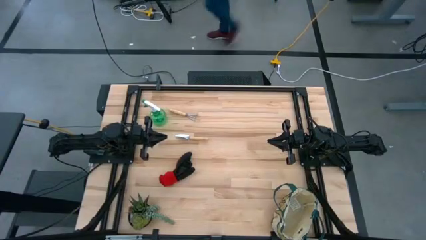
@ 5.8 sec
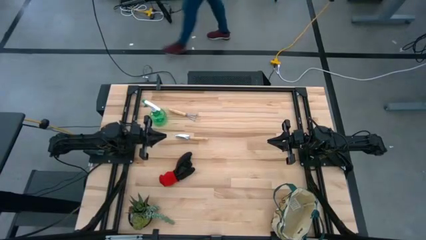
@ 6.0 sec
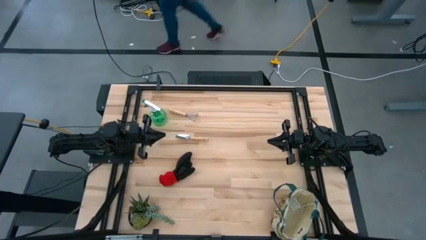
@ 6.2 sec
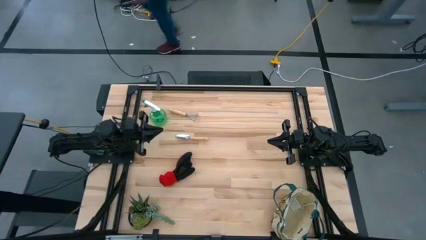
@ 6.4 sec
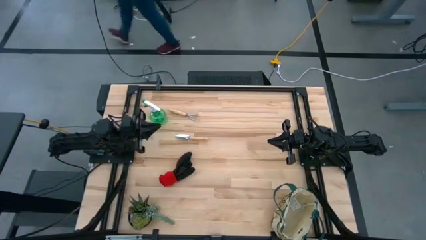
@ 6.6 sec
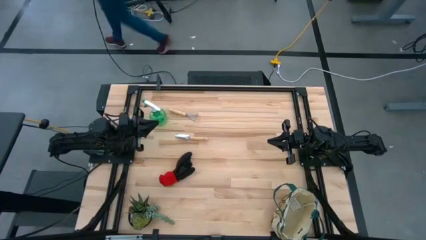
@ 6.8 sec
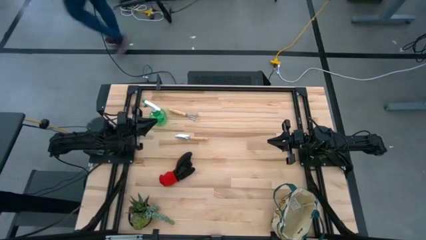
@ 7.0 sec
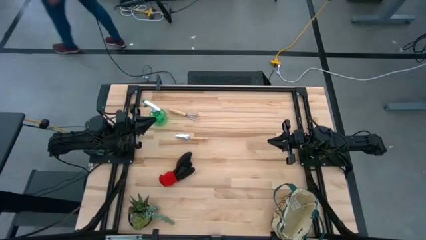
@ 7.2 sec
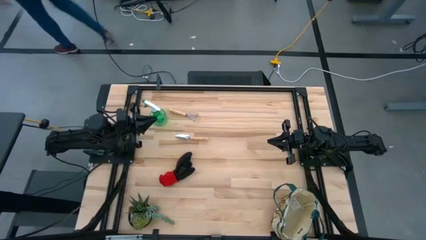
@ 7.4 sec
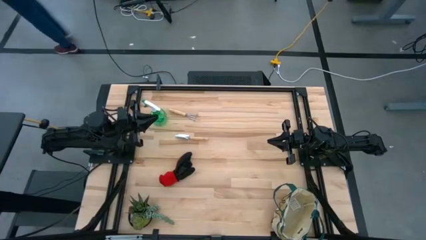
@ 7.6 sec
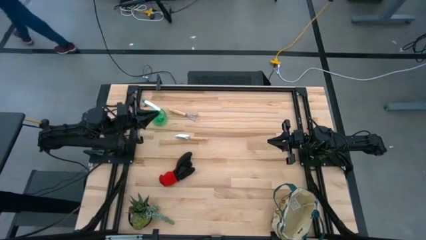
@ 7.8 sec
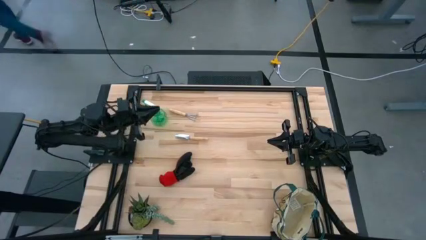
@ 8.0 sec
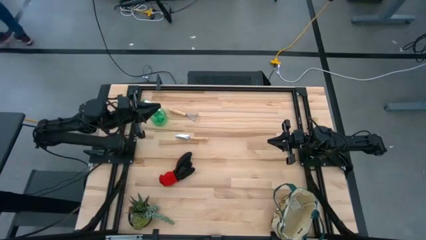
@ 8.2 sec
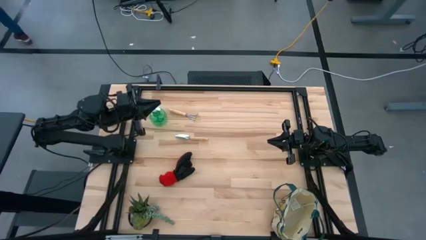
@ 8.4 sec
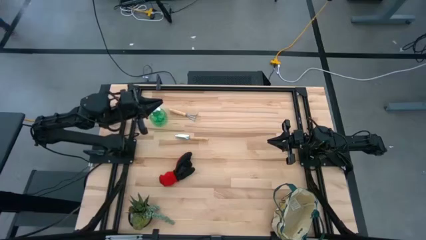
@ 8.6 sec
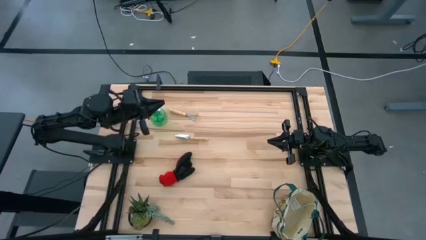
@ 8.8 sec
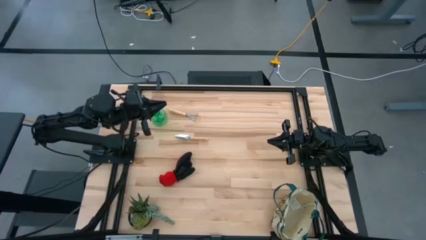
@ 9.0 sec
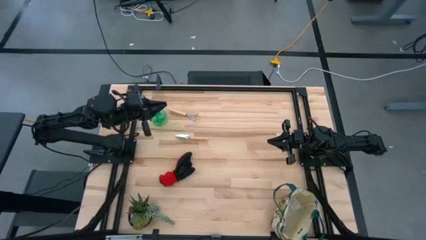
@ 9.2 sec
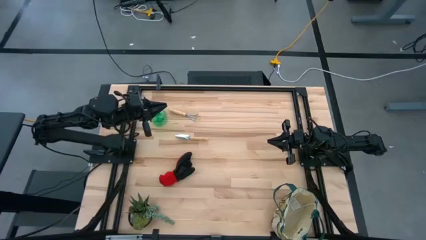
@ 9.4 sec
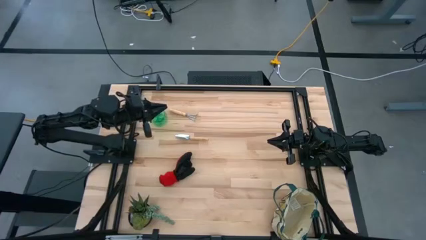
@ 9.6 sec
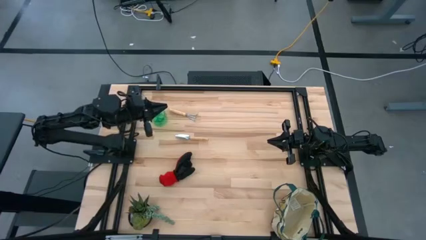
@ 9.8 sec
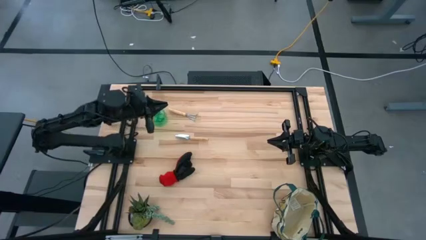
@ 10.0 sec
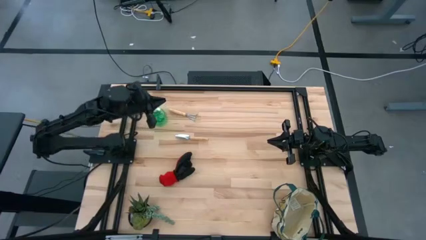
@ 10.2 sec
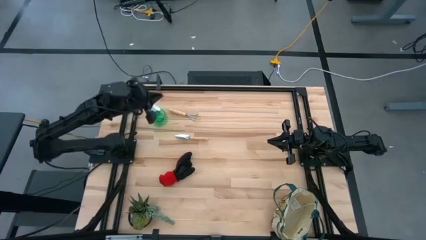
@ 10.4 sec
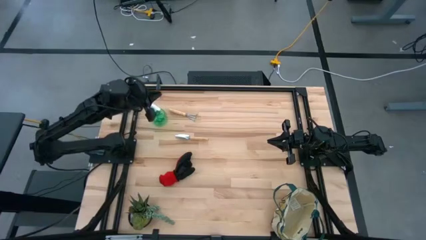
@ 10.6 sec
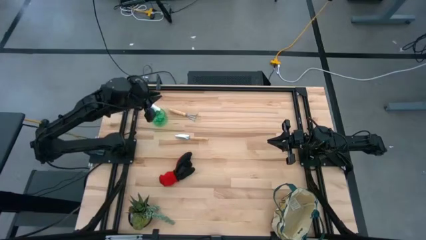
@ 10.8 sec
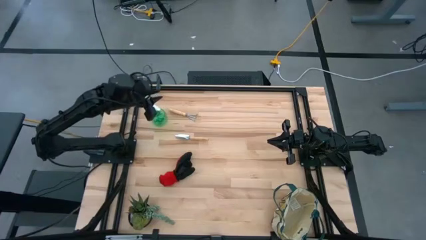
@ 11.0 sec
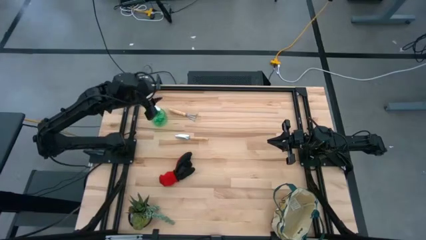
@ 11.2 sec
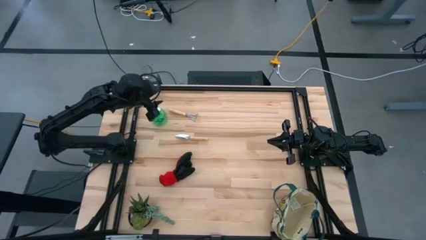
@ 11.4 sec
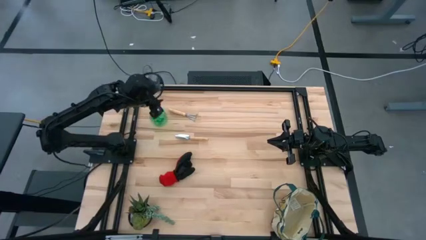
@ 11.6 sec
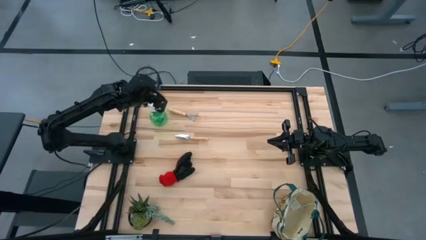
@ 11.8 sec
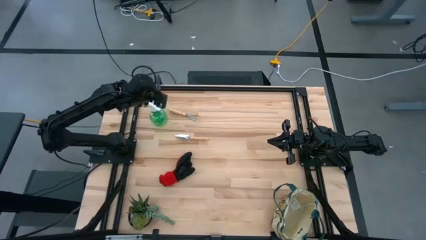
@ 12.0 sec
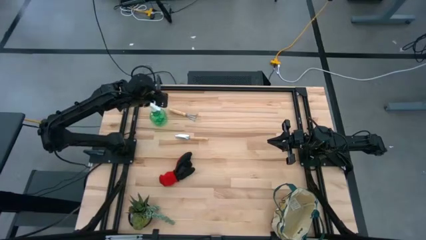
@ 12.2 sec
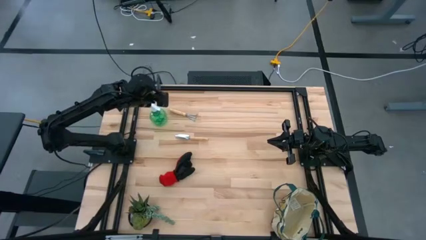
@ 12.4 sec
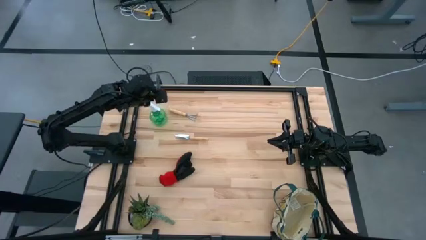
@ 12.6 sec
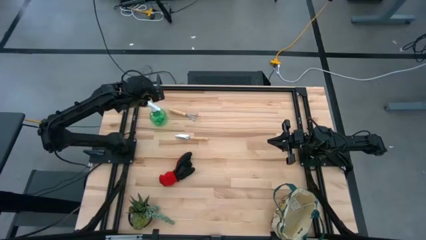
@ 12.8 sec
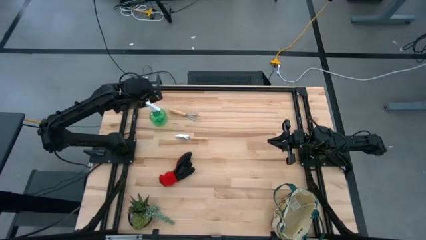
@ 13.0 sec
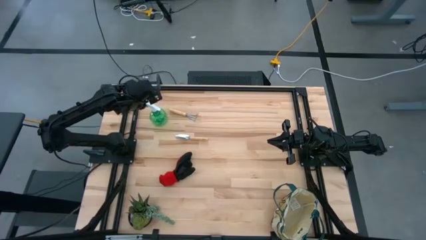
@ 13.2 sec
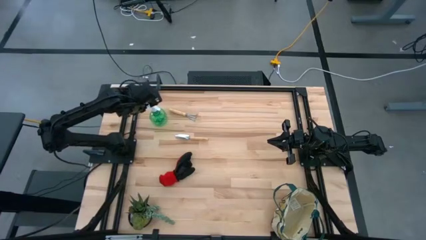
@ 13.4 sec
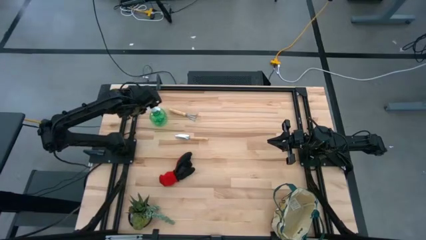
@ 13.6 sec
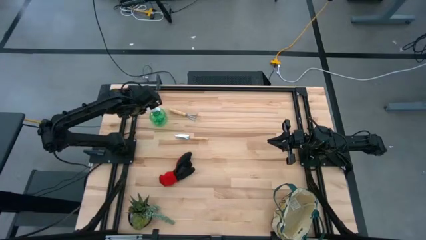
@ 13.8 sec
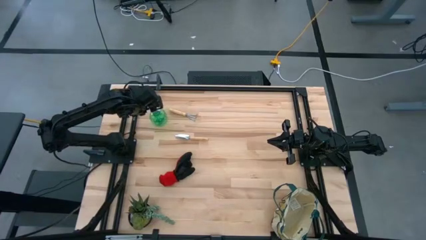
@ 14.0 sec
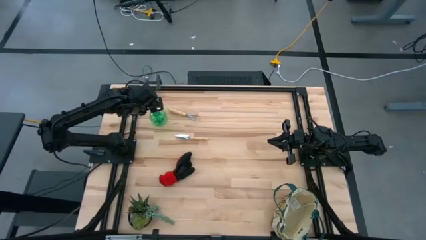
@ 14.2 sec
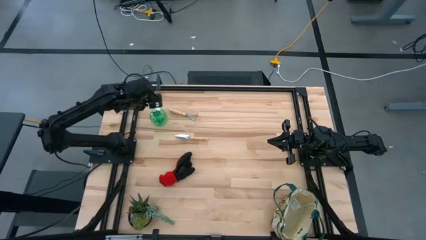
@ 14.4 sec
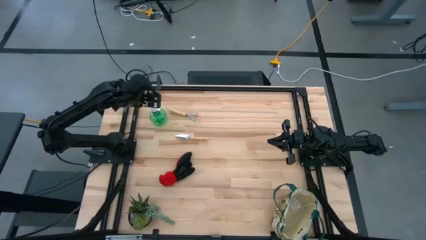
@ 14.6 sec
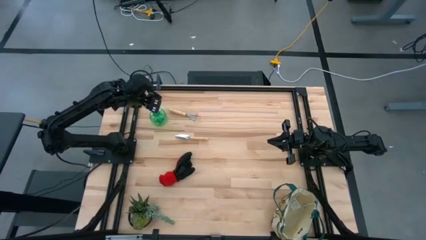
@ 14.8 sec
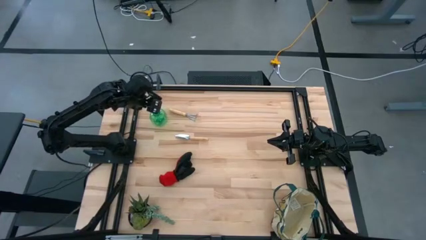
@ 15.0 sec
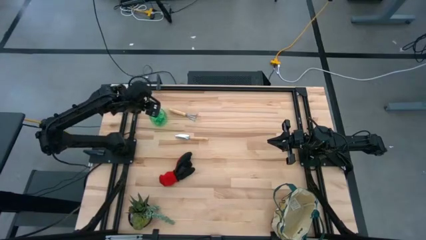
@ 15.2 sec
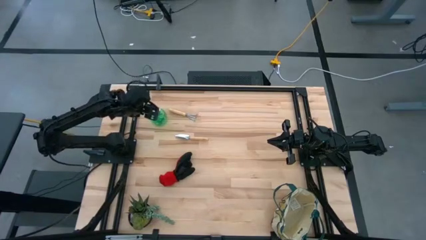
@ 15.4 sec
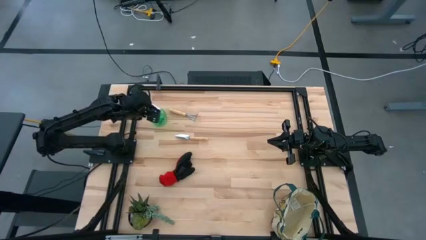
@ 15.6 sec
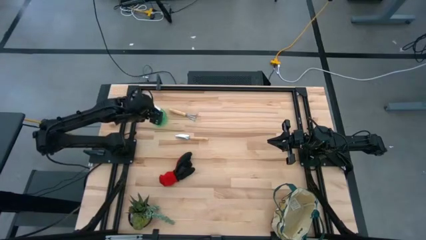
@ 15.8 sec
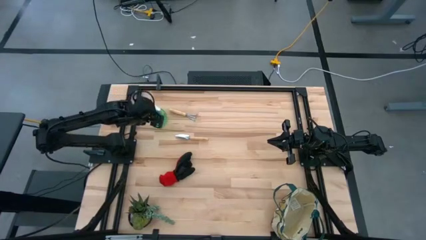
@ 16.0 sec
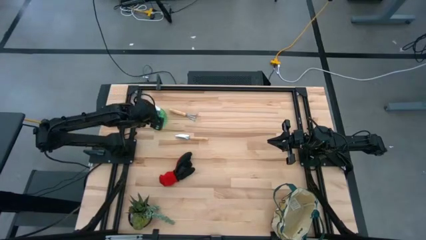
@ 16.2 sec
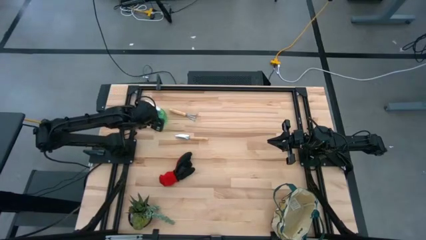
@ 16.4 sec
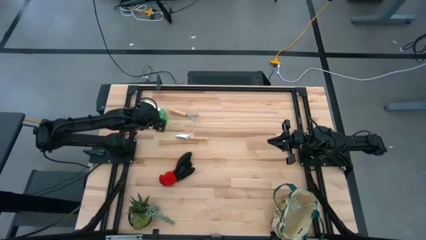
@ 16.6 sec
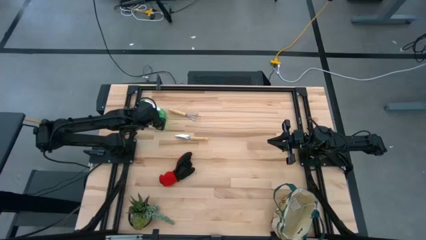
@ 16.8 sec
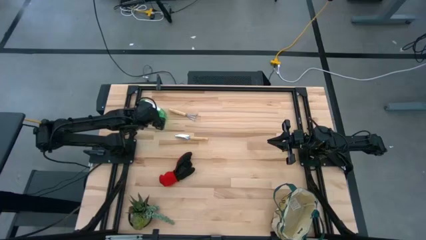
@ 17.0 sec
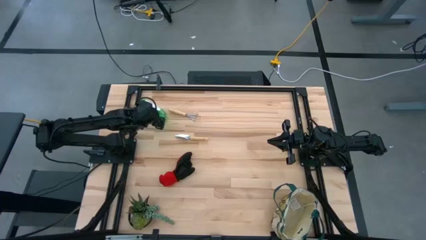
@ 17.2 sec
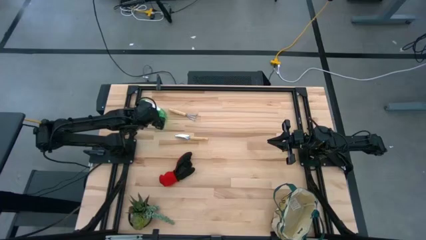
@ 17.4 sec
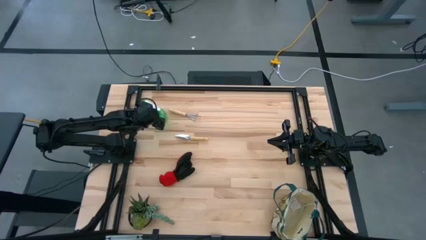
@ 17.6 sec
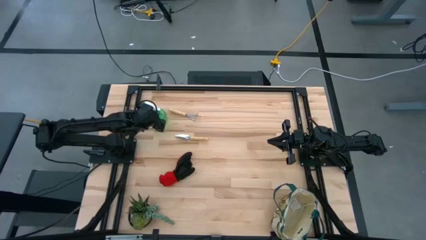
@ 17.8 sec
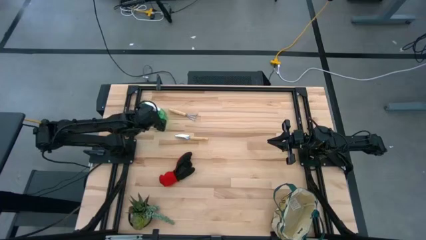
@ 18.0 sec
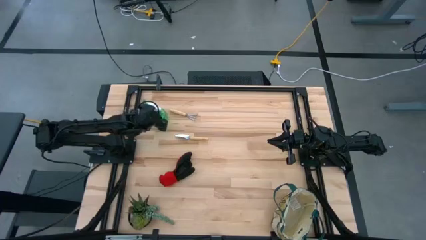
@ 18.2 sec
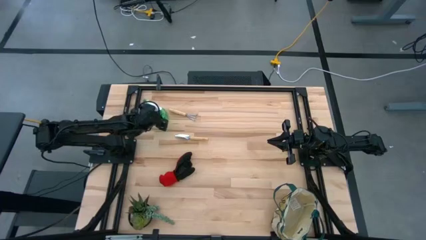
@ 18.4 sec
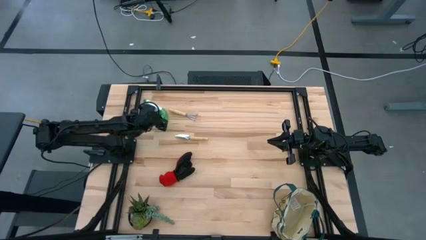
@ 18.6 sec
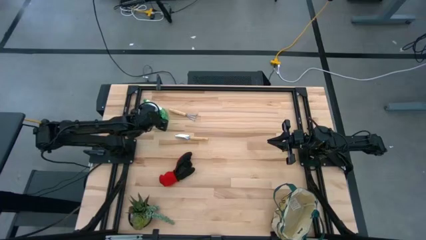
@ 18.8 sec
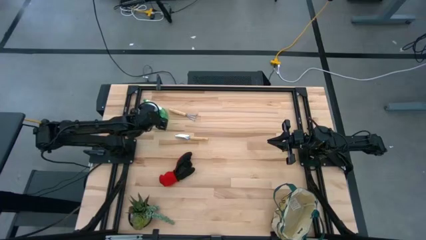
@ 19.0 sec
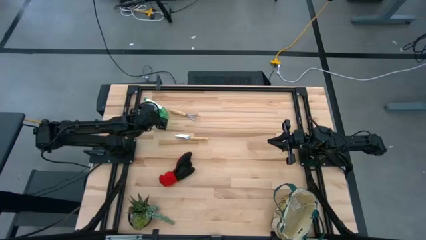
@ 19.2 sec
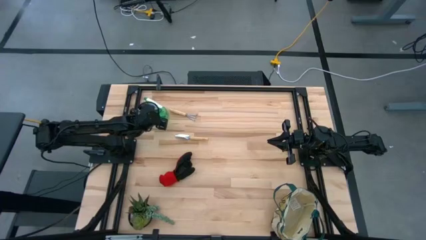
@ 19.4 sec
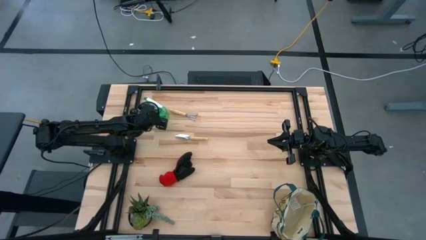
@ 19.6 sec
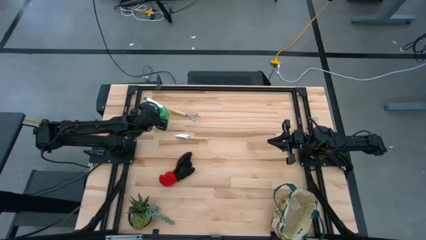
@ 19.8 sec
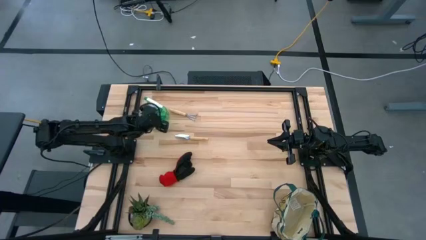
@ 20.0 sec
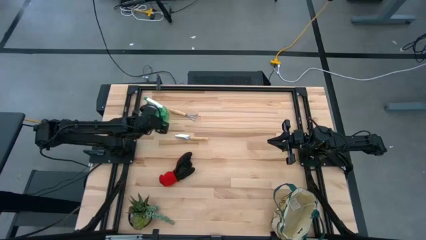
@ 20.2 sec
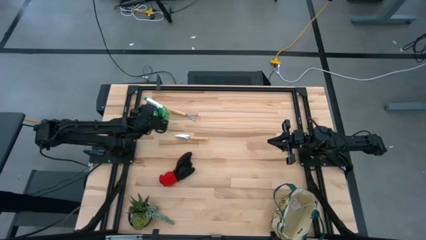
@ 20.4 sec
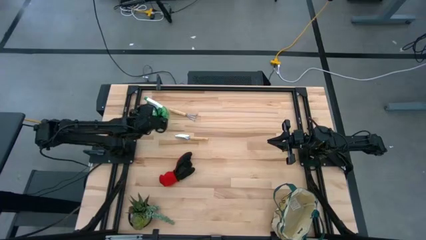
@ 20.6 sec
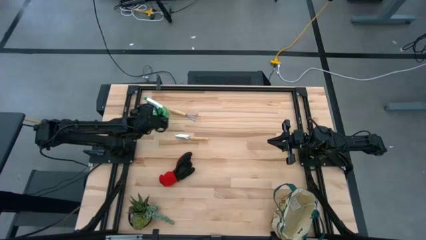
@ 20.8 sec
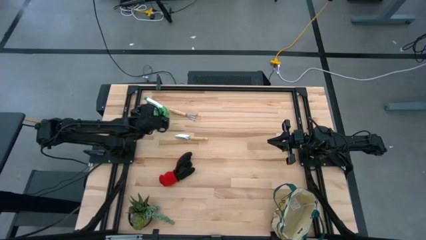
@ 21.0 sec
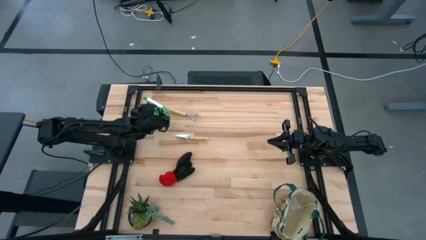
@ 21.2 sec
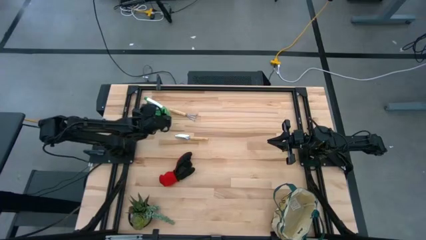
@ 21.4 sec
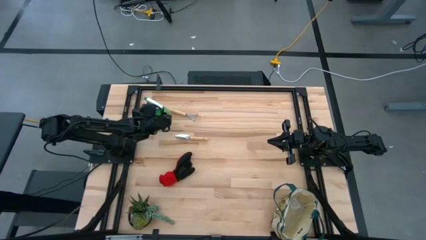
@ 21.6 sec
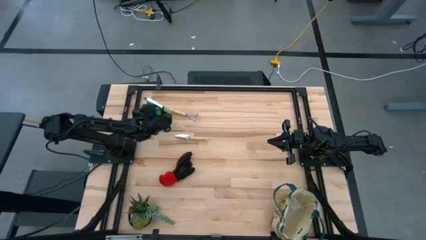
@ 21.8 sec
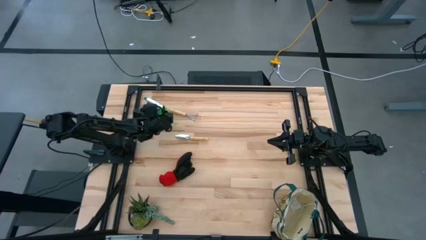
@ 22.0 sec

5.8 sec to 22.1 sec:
Task: Pick & Place Garden tools in Gardening bag
Put the green spray bottle into the gardening bag
